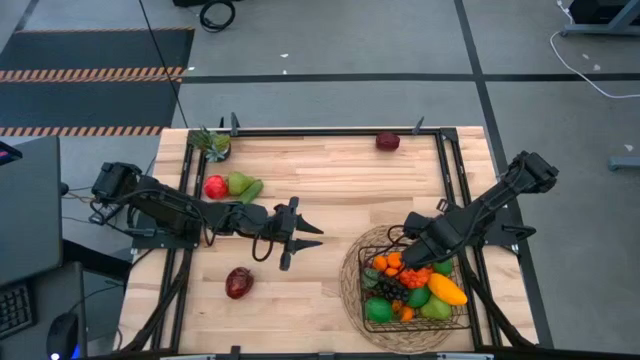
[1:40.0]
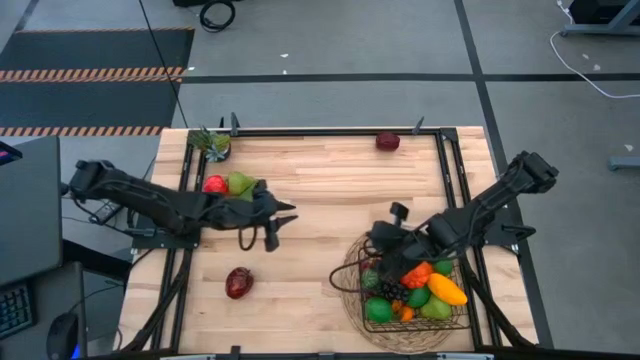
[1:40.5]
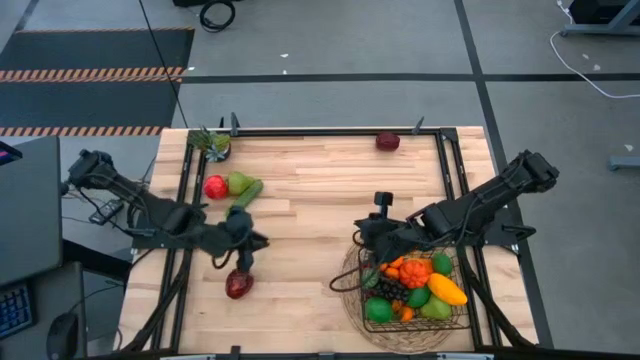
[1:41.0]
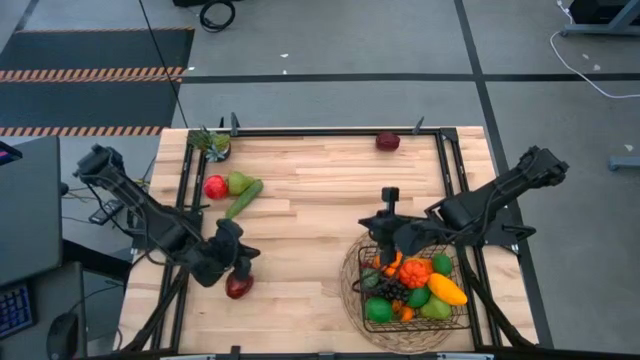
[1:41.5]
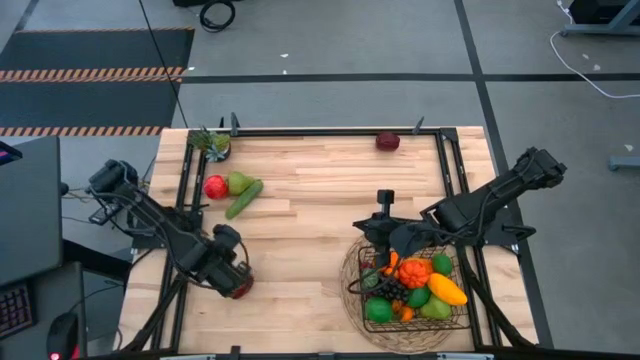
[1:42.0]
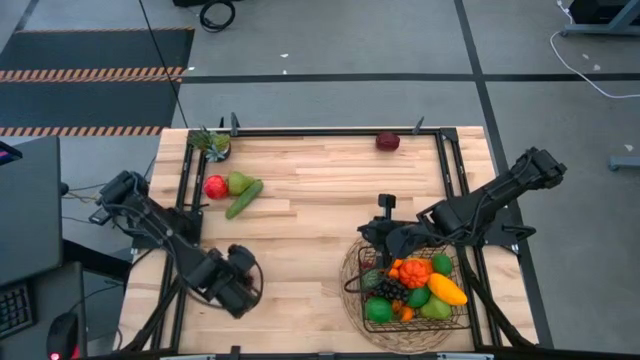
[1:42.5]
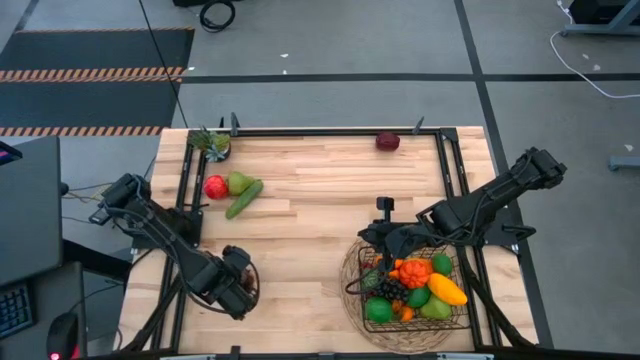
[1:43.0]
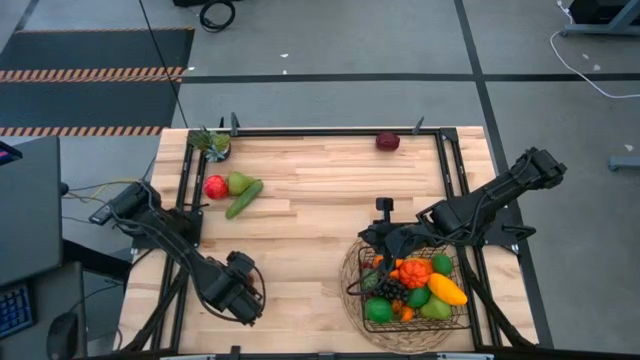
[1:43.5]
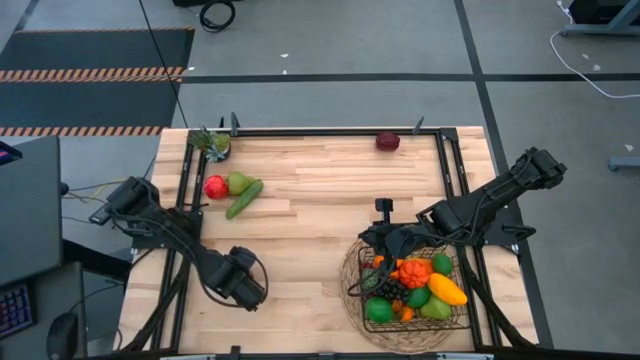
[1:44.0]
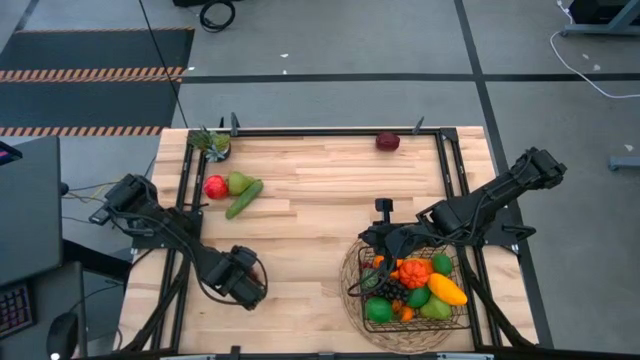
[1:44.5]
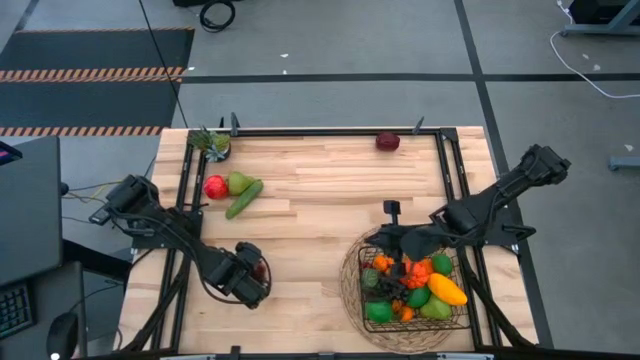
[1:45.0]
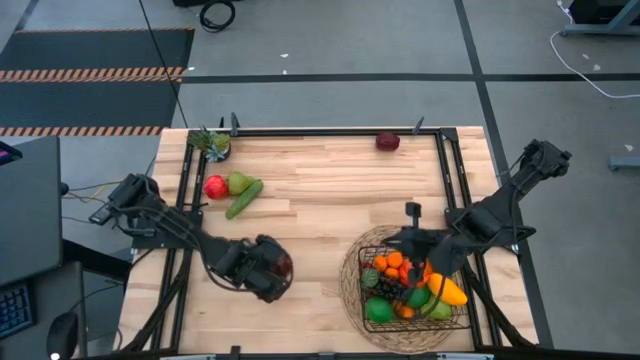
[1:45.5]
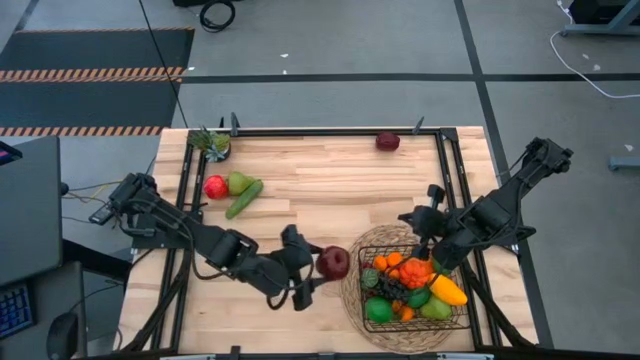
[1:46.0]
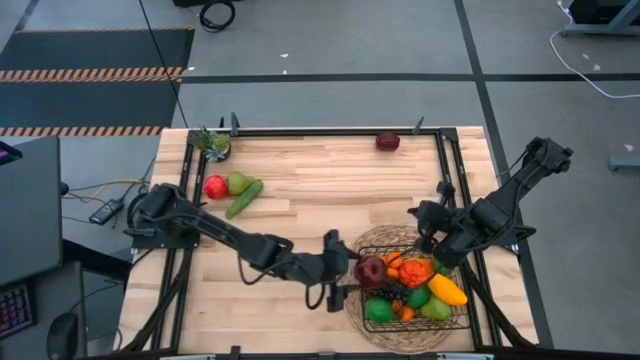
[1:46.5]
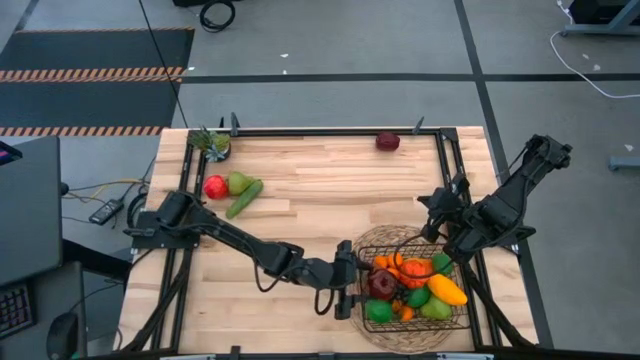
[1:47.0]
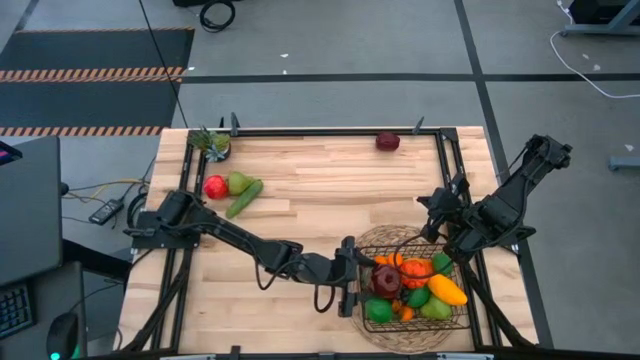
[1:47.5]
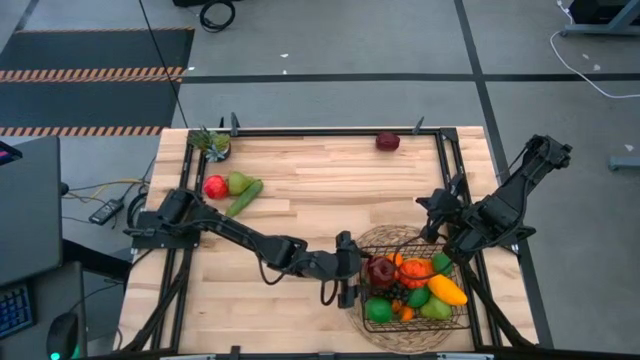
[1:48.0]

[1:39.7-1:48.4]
Task: Build produce basket
Put the bottom dark red apple into the black wire basket

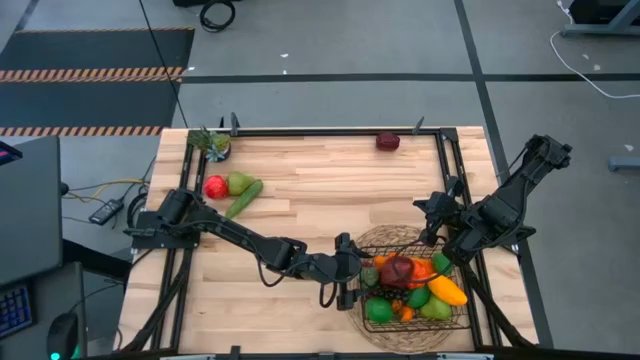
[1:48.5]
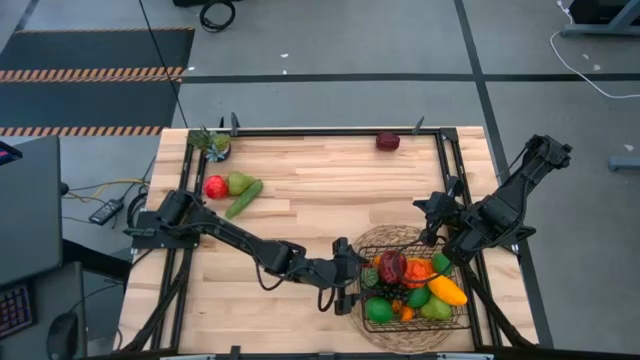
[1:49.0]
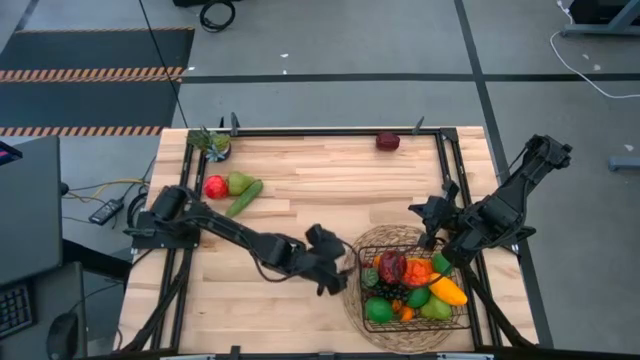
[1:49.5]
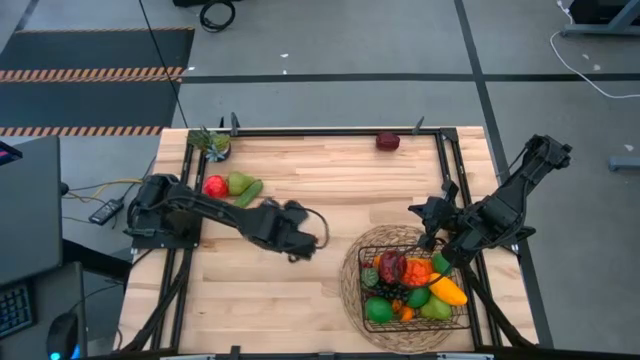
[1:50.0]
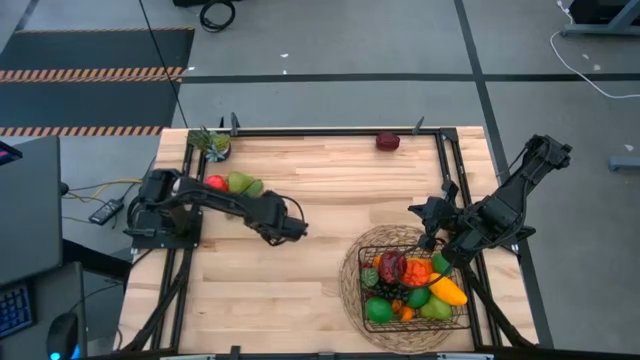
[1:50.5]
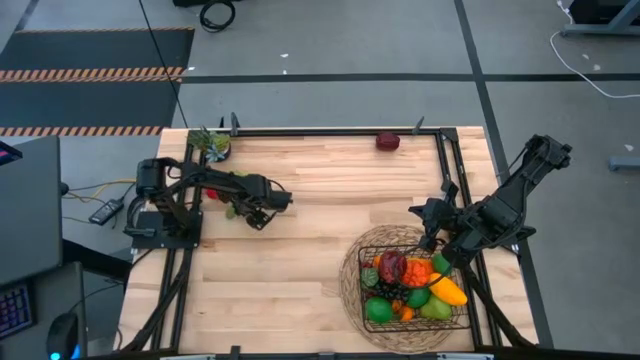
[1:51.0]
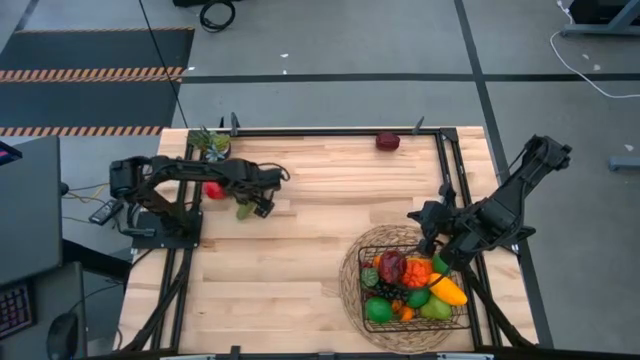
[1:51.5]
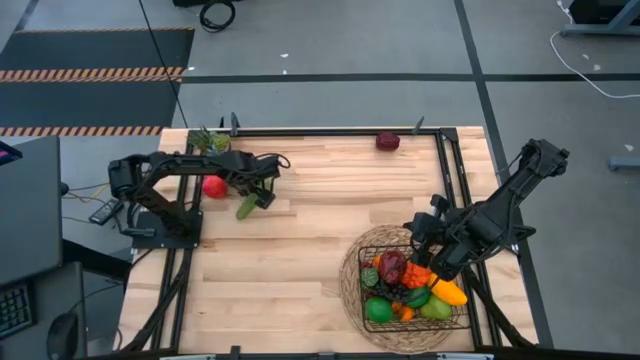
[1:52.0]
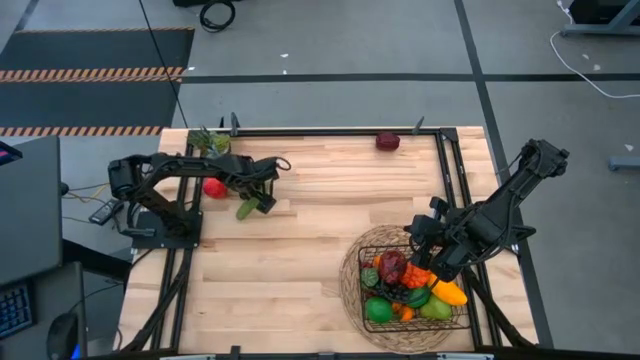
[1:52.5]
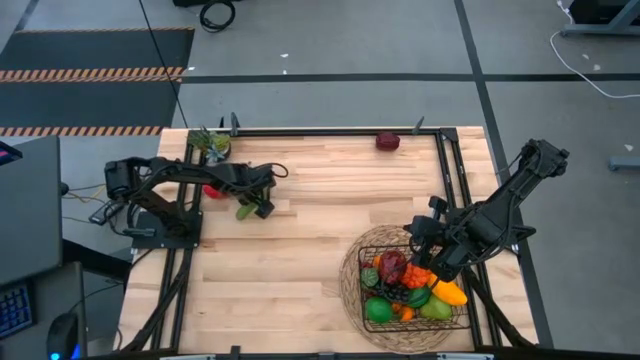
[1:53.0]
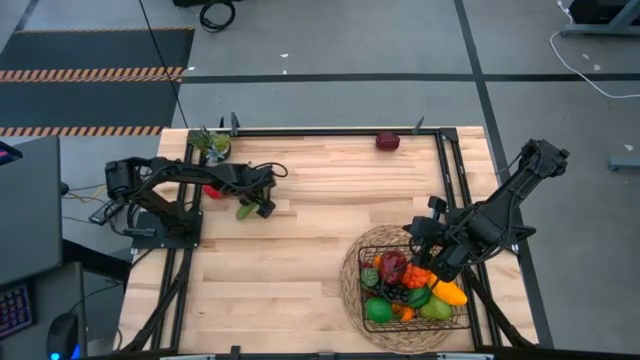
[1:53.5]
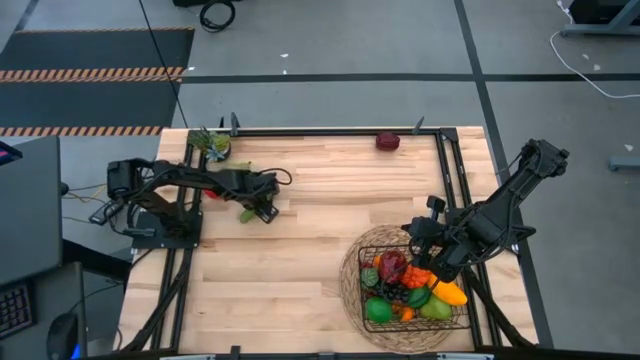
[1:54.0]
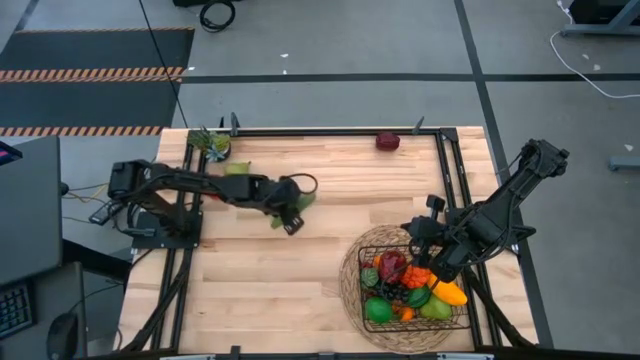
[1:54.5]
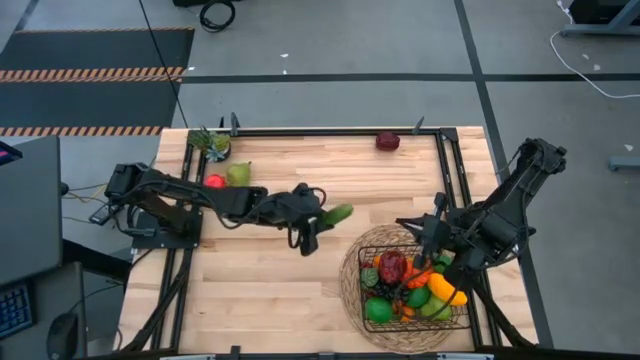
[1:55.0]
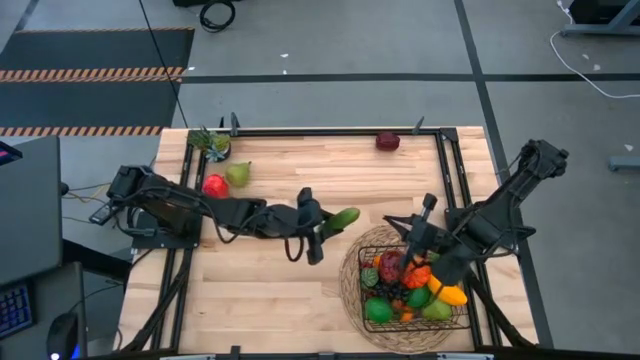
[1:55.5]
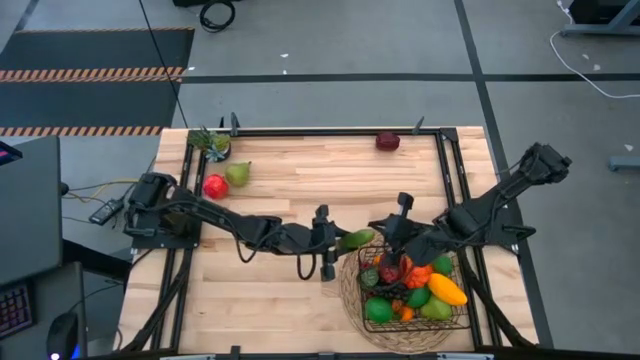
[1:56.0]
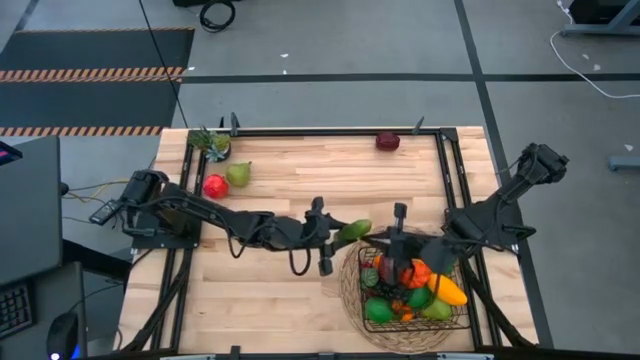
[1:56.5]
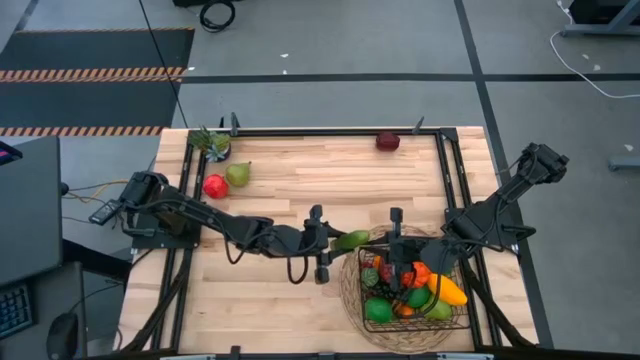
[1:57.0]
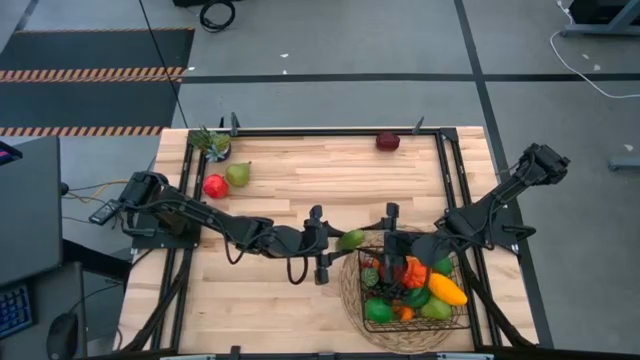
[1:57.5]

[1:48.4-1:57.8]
Put the green cucumber into the black wire basket

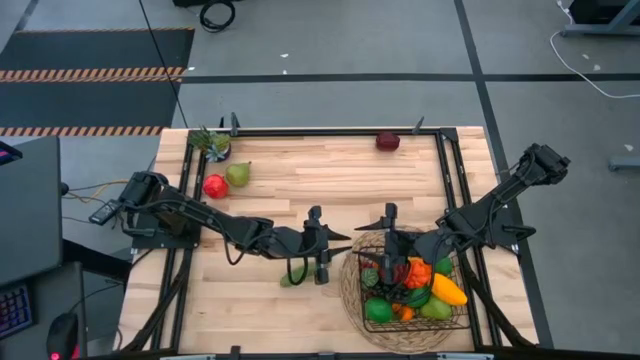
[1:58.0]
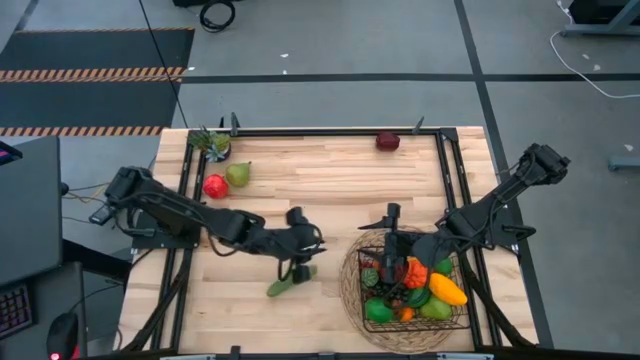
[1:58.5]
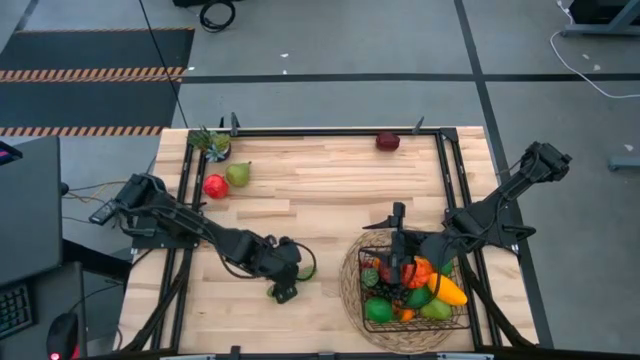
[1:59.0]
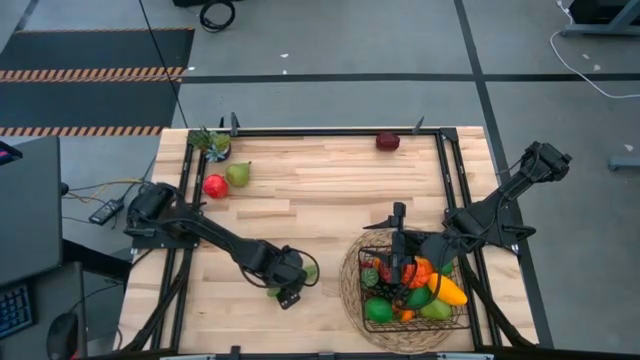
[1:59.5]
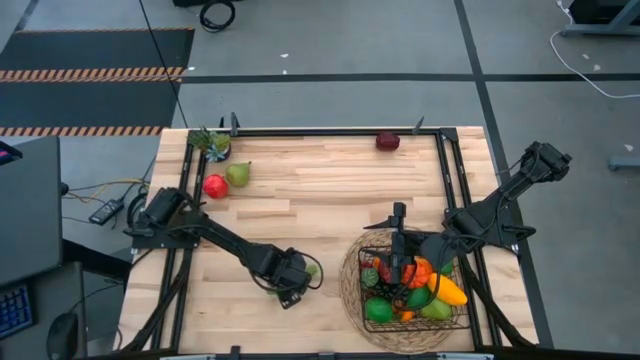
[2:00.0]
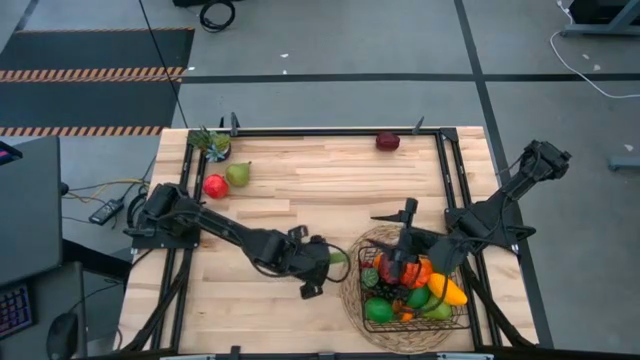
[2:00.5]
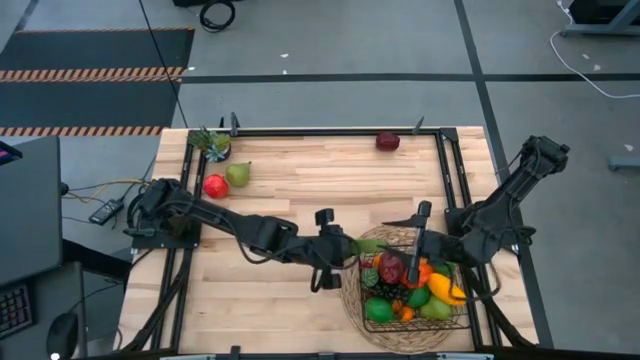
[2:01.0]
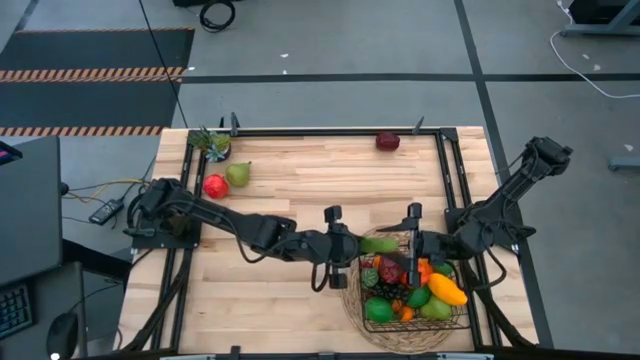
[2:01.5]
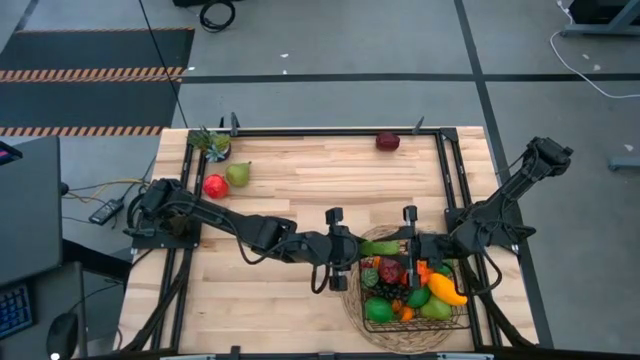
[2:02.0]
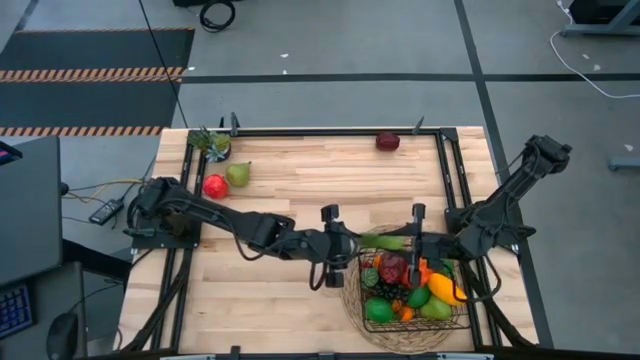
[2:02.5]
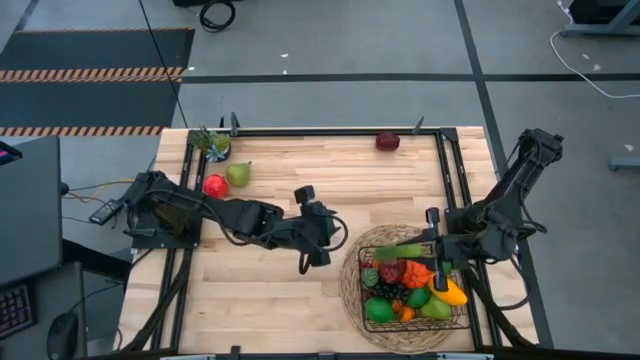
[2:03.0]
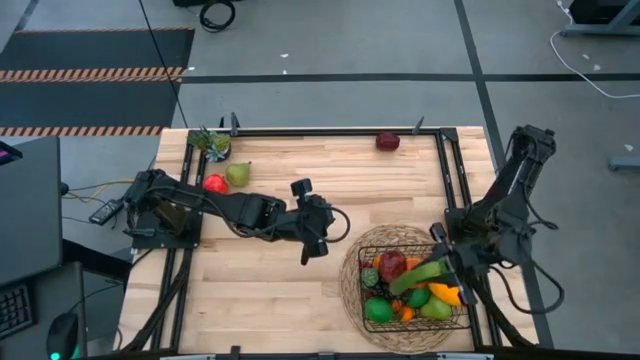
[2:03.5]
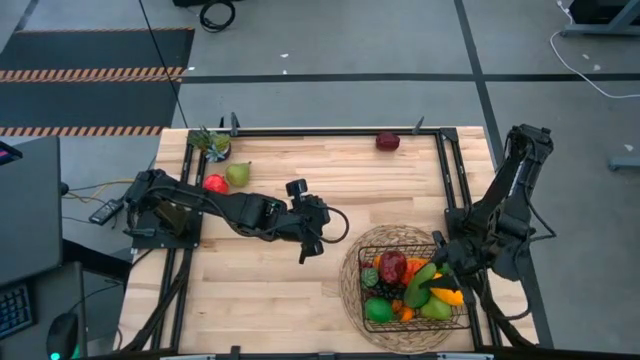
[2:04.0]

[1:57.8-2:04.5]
Put the green cucumber into the black wire basket
